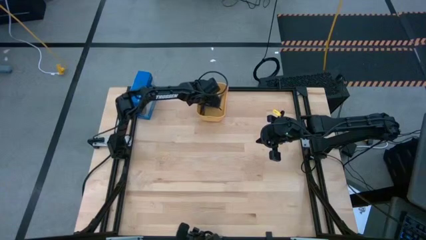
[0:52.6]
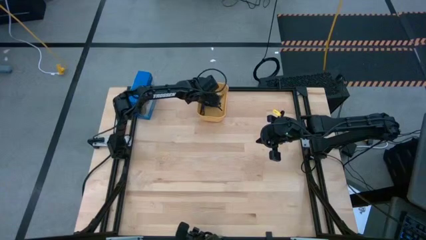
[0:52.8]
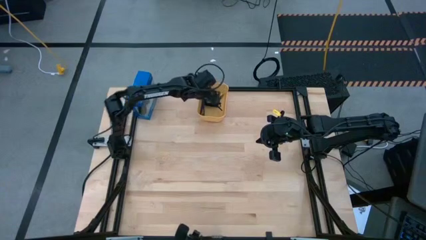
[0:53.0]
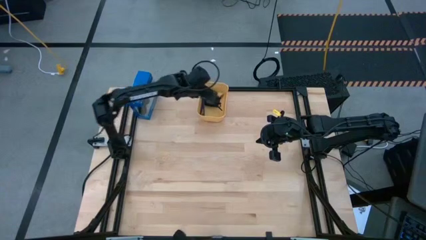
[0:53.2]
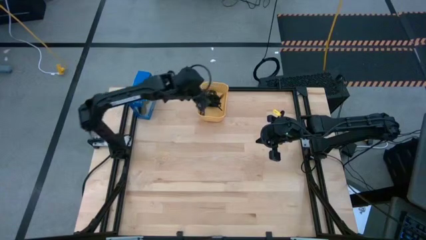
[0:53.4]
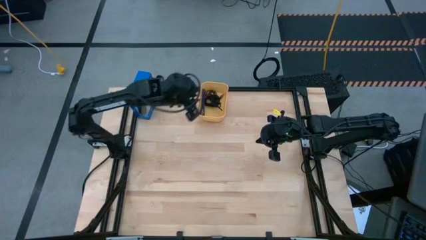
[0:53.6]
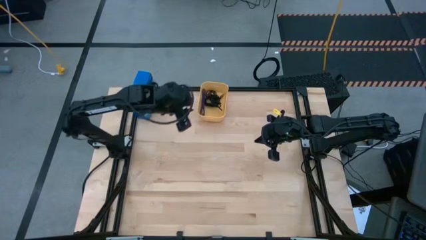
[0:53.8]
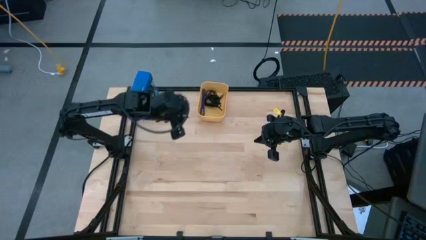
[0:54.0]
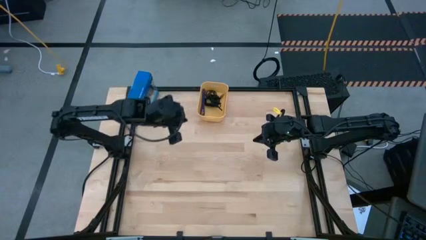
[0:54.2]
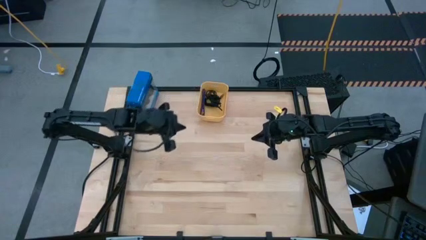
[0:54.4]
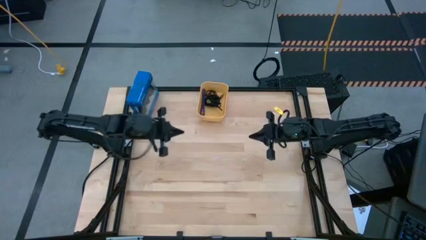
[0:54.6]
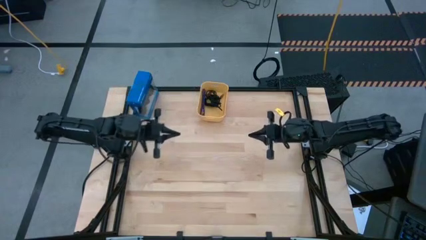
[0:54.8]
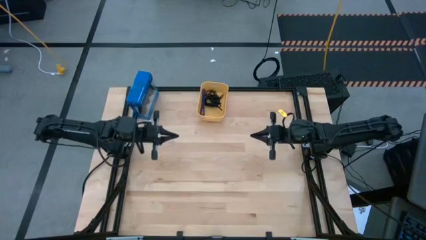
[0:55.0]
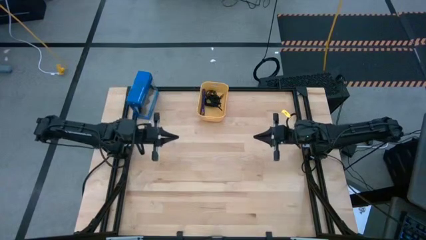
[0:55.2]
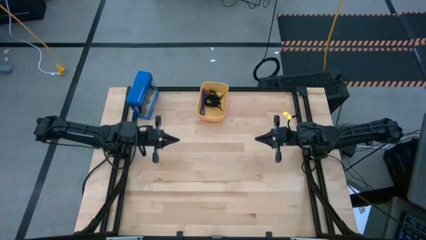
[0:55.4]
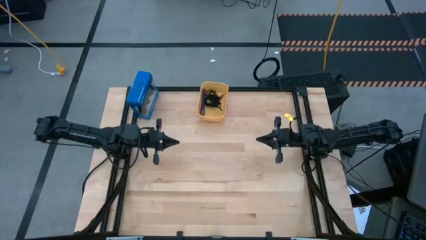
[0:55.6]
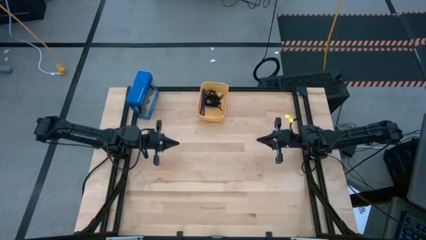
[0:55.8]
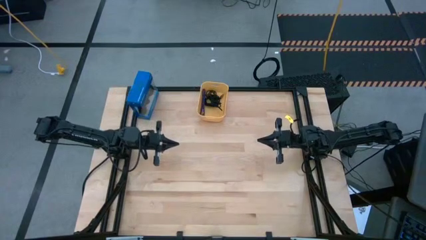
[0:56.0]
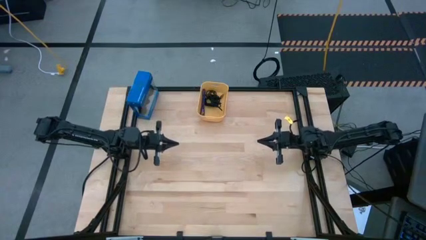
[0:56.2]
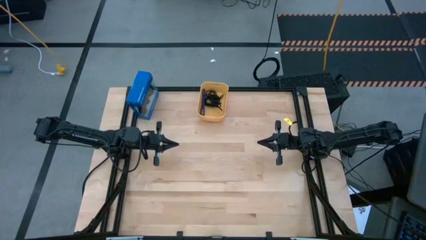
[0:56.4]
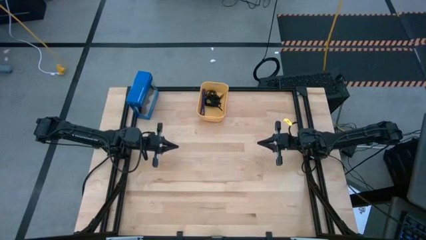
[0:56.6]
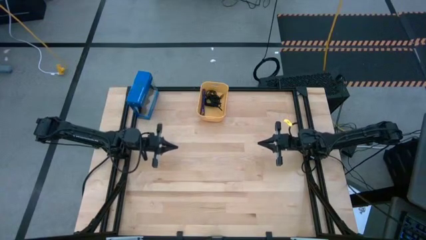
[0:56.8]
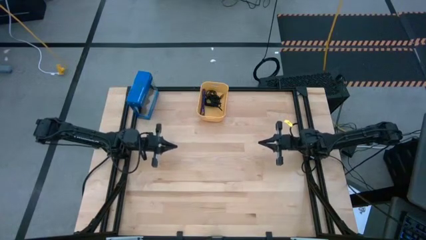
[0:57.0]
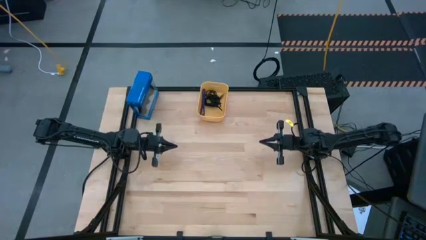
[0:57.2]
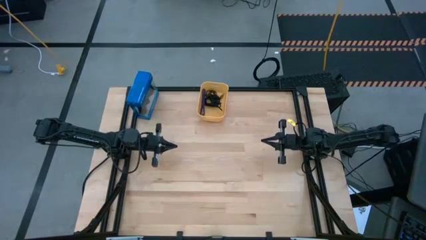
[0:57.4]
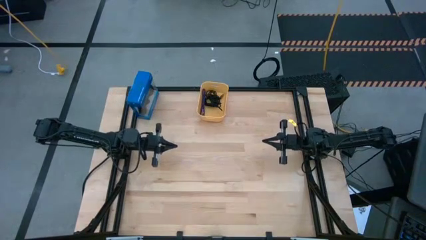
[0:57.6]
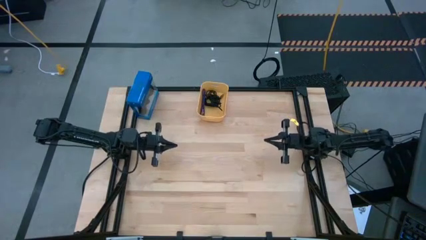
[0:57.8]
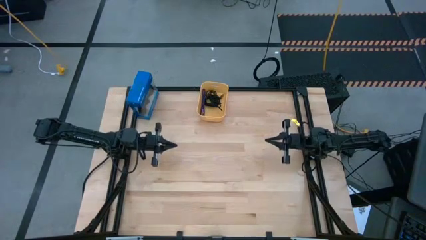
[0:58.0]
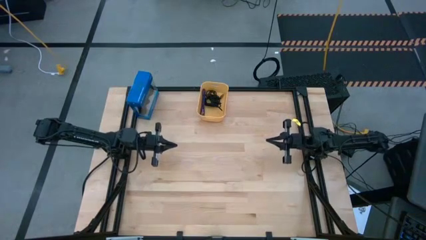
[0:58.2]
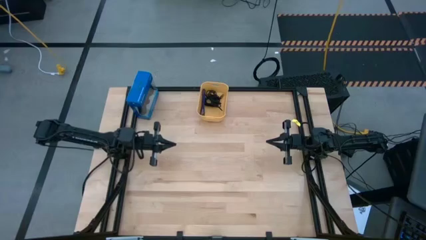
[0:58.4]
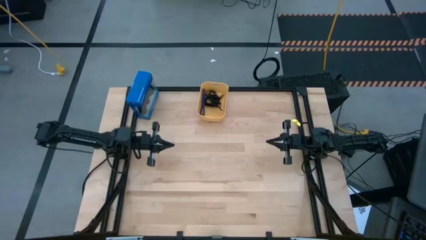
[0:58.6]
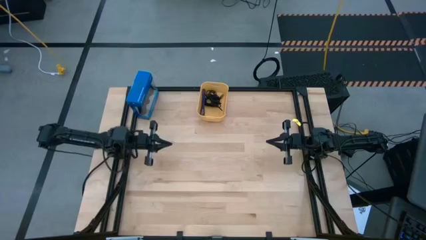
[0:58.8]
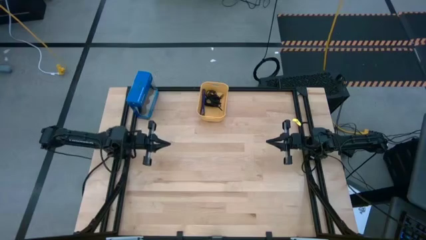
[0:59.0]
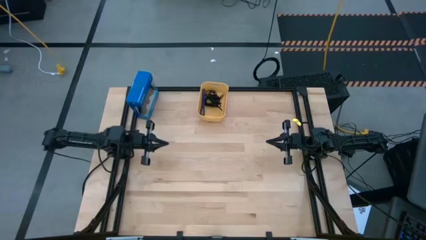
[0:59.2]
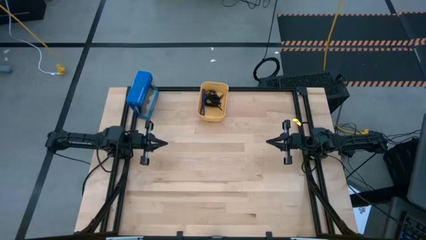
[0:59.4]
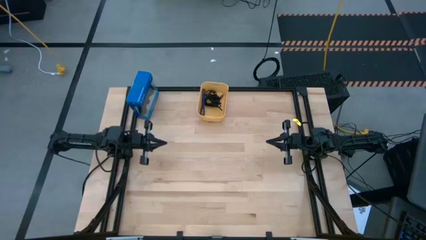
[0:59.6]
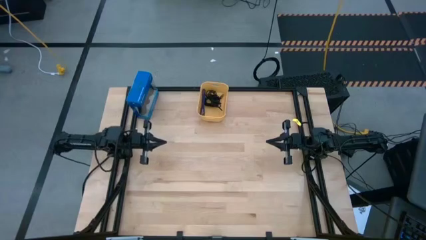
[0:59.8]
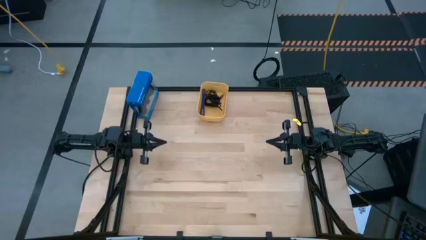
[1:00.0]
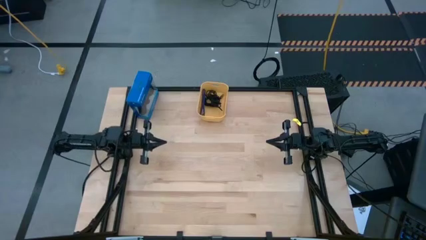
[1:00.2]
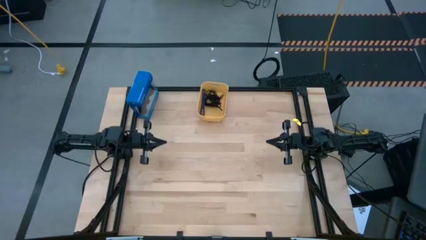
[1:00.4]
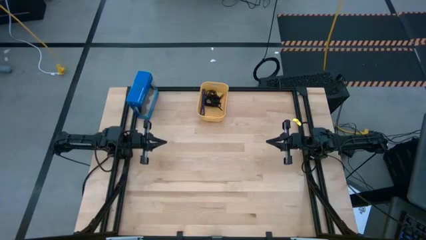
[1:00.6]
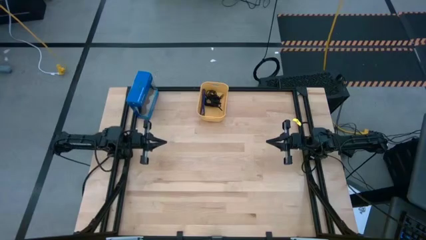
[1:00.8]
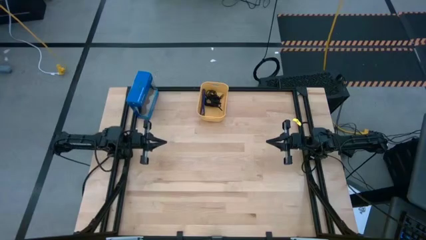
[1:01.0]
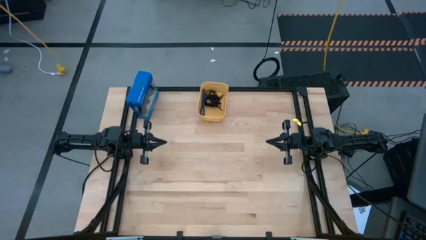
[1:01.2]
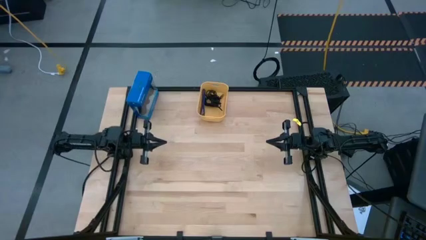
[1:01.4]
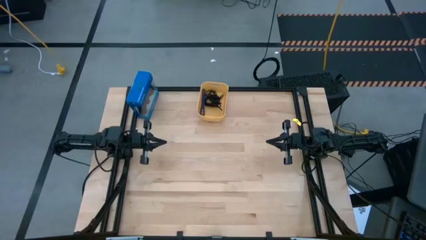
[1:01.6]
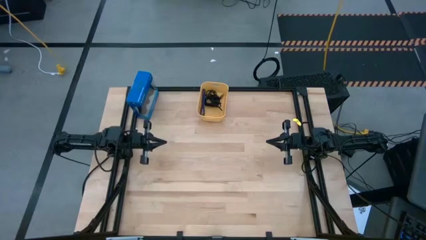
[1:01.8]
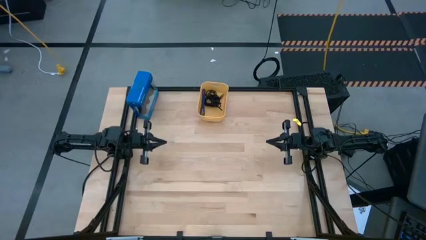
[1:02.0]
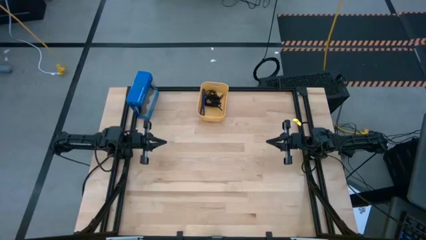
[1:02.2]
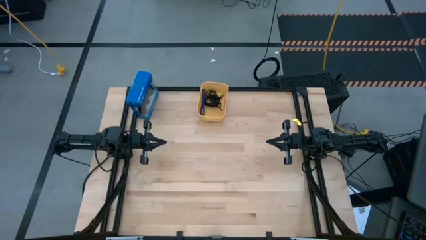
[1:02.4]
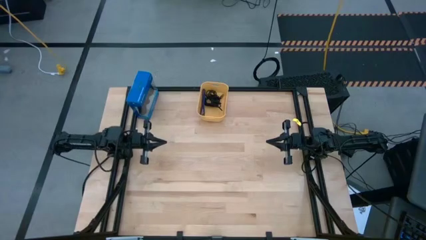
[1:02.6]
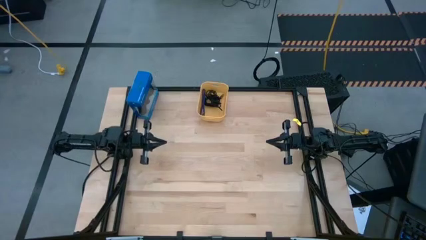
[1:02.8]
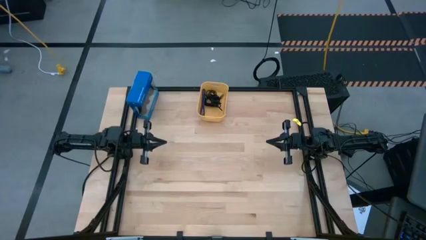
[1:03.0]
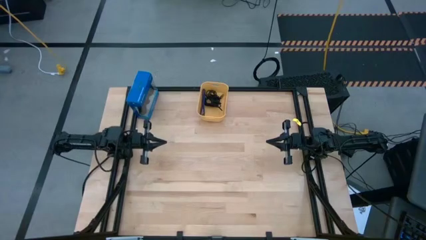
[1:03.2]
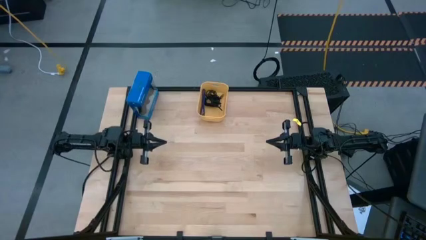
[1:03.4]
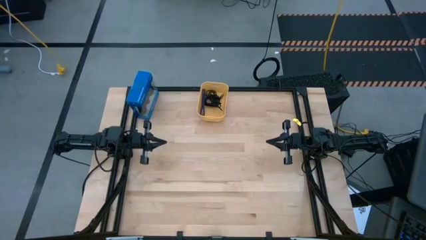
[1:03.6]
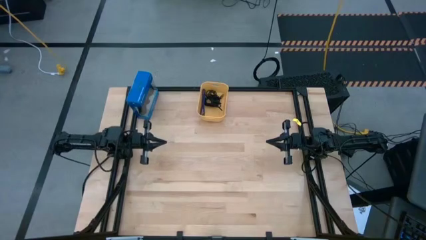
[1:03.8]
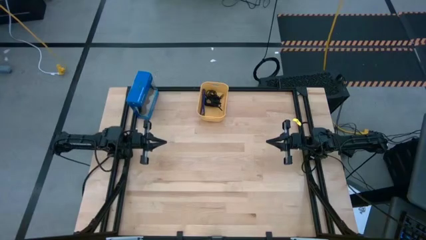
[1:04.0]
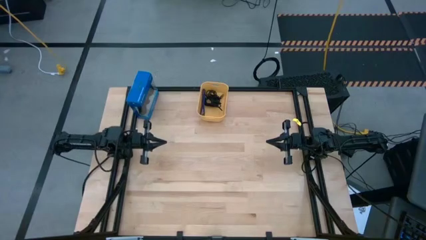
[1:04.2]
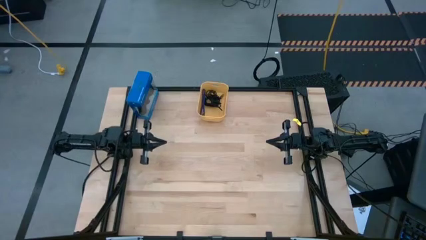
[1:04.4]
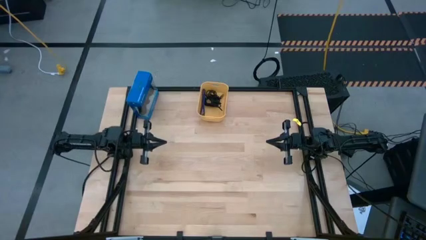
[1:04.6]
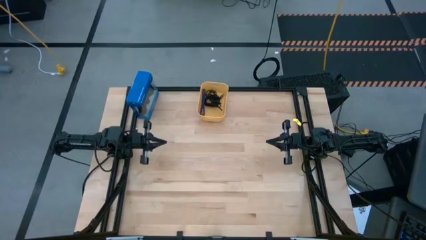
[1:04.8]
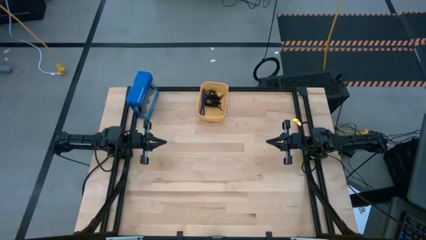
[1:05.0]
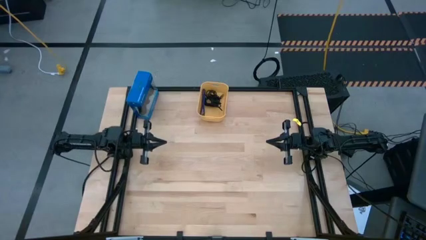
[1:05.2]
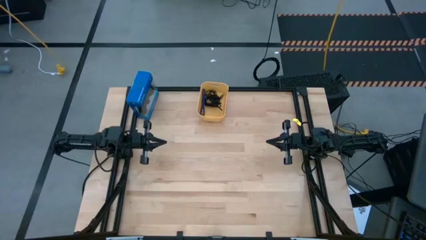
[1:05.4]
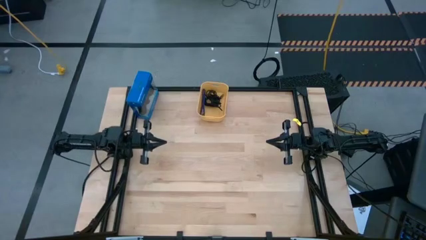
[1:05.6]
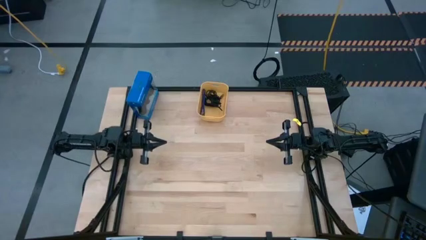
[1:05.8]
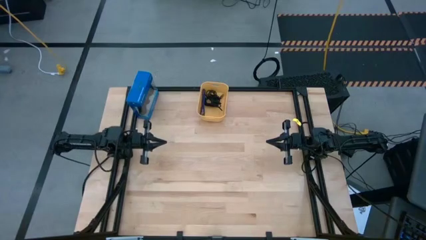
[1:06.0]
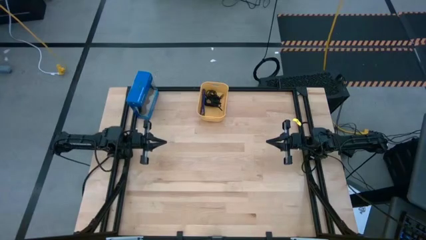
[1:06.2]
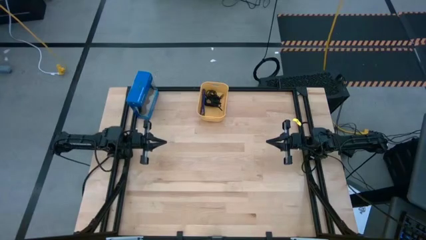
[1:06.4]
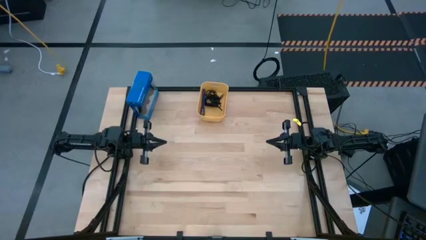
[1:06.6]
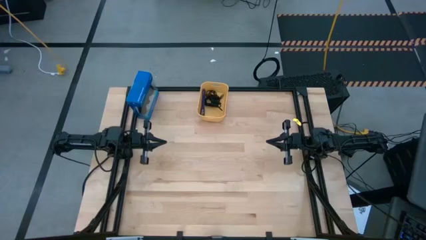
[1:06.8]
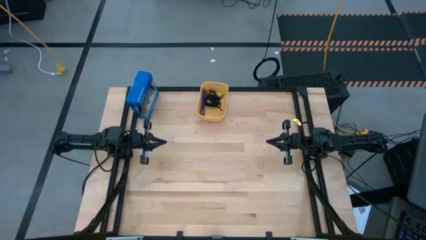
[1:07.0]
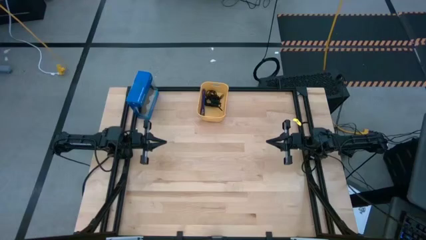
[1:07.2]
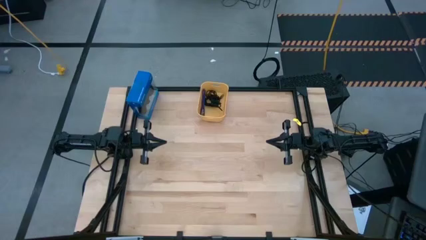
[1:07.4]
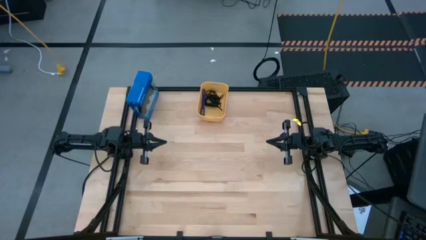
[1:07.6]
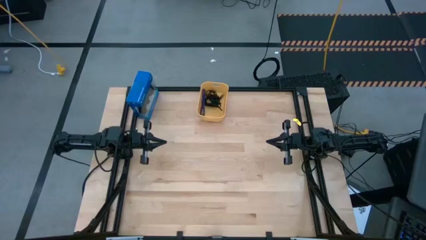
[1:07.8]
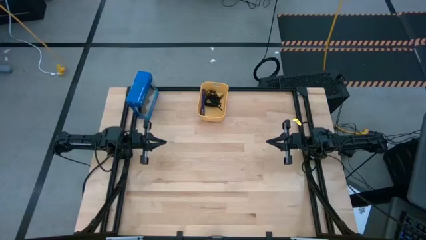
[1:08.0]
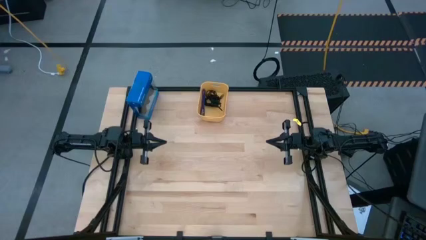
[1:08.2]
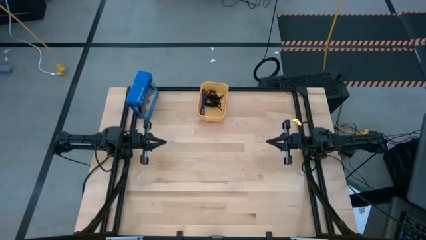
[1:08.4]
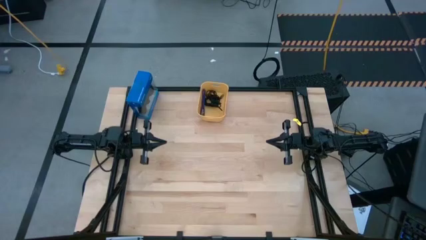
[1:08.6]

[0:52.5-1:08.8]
Task: Pick and place USB-C Cables
Return to Home Position
